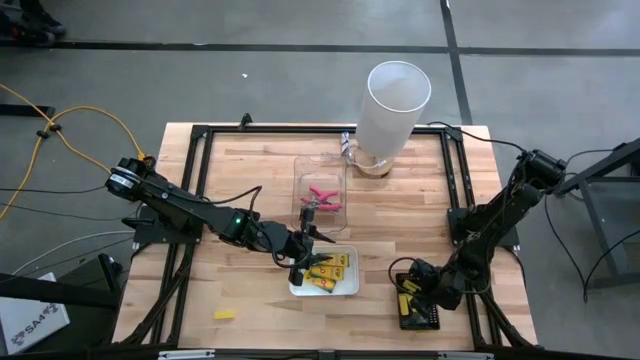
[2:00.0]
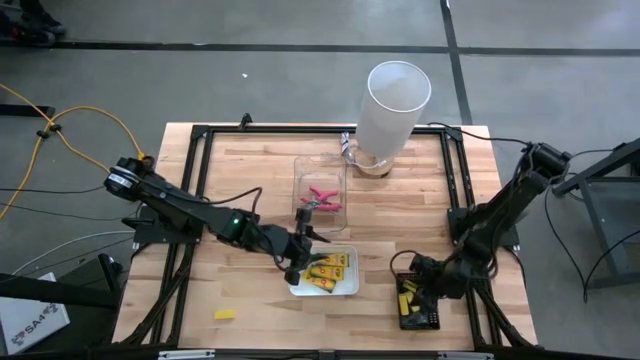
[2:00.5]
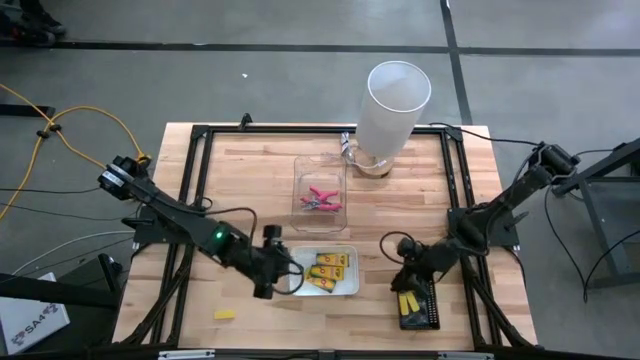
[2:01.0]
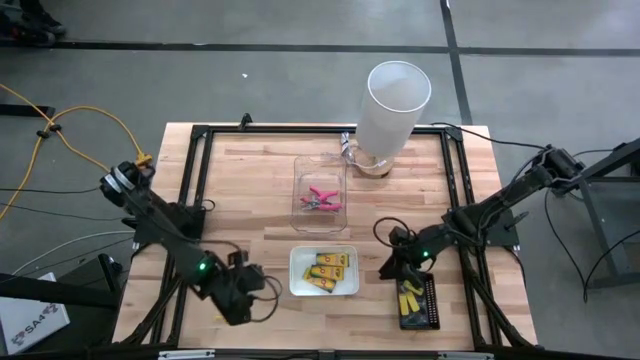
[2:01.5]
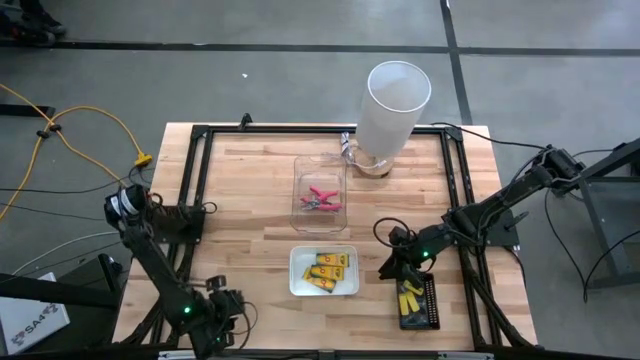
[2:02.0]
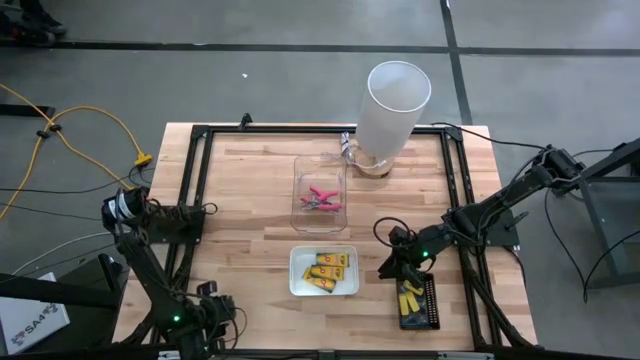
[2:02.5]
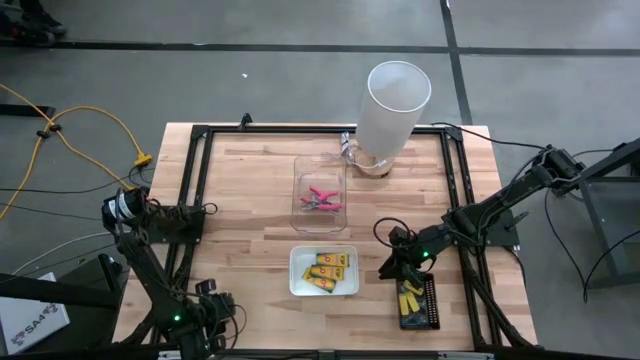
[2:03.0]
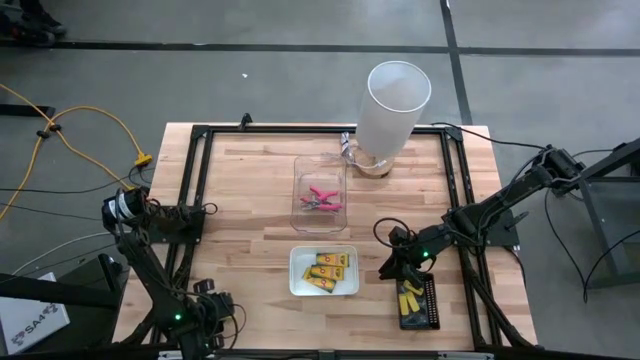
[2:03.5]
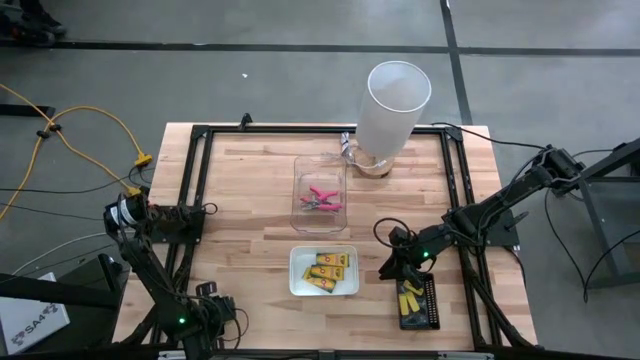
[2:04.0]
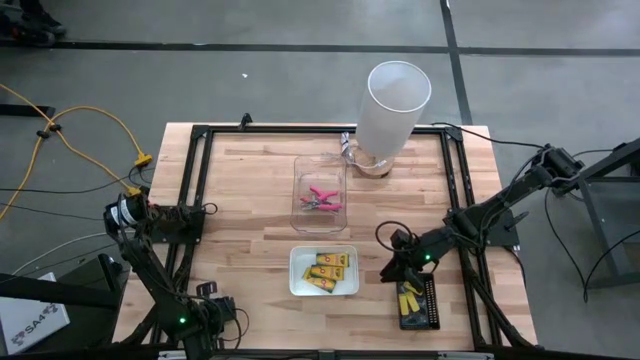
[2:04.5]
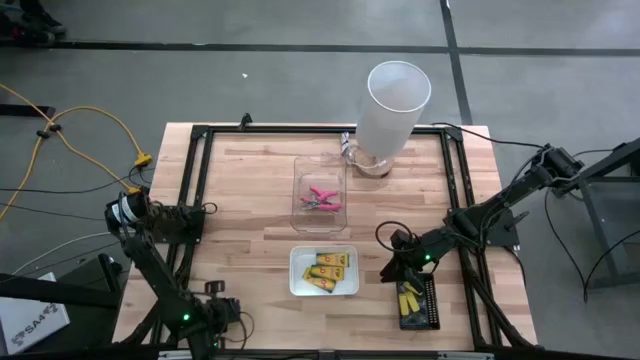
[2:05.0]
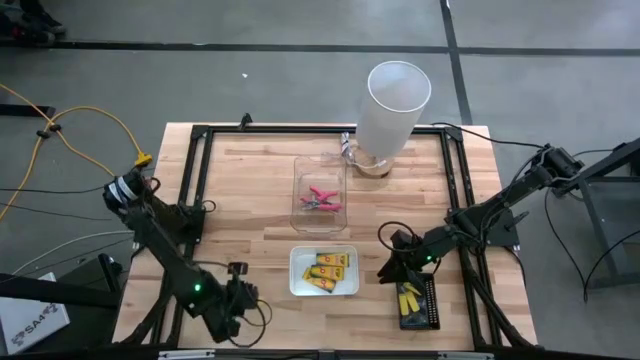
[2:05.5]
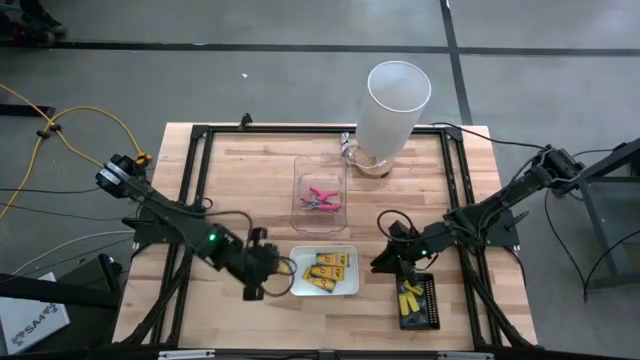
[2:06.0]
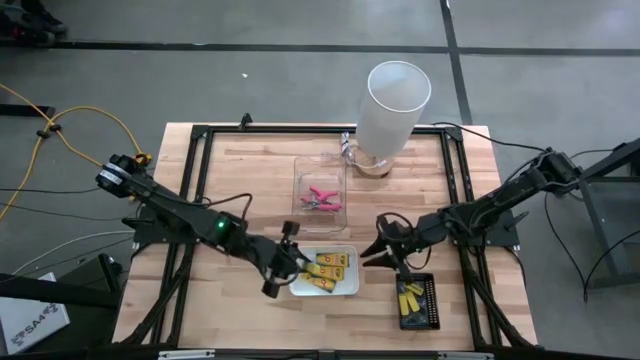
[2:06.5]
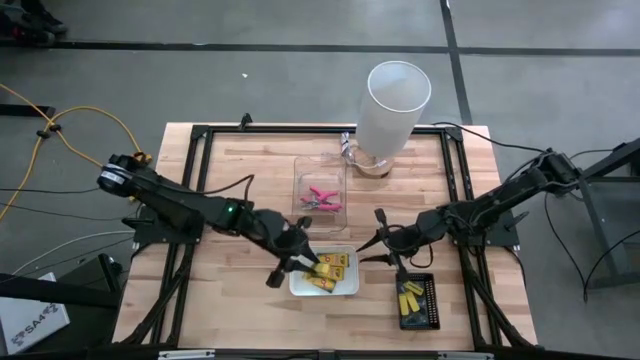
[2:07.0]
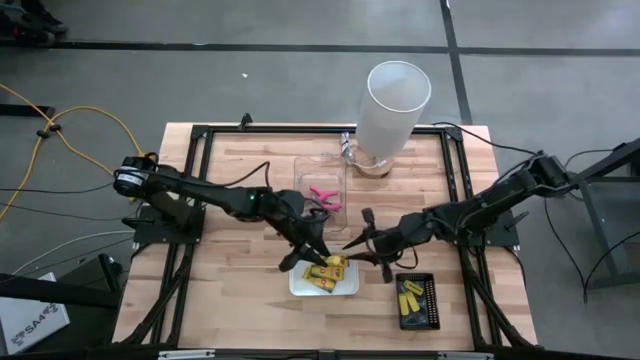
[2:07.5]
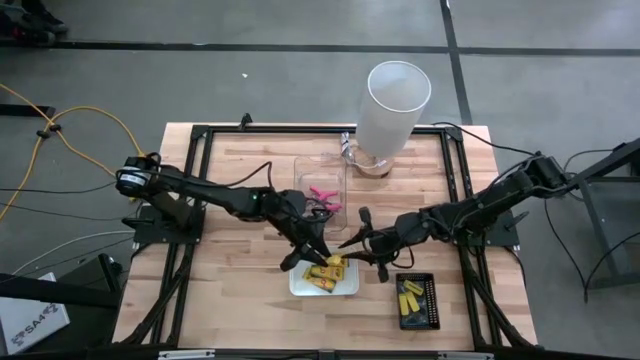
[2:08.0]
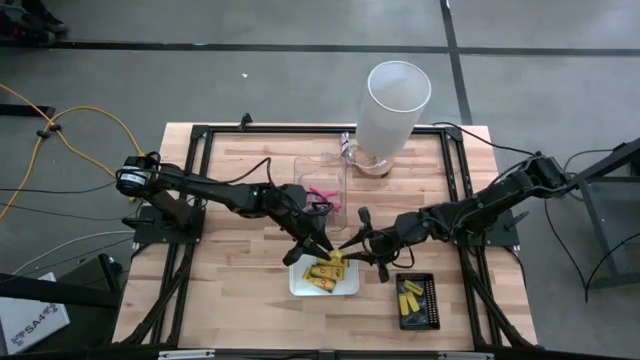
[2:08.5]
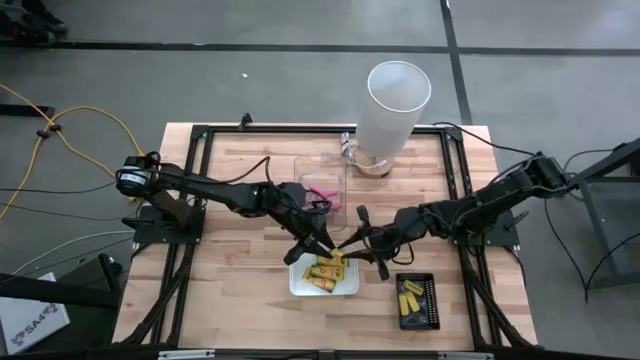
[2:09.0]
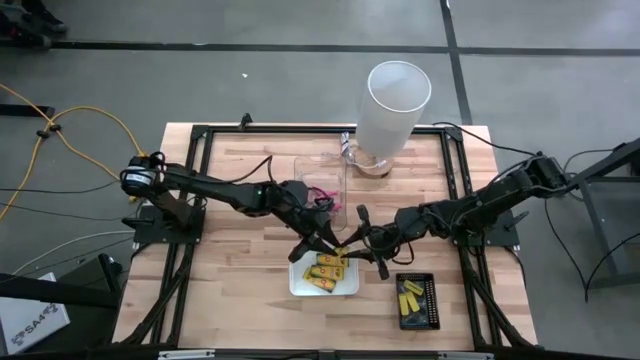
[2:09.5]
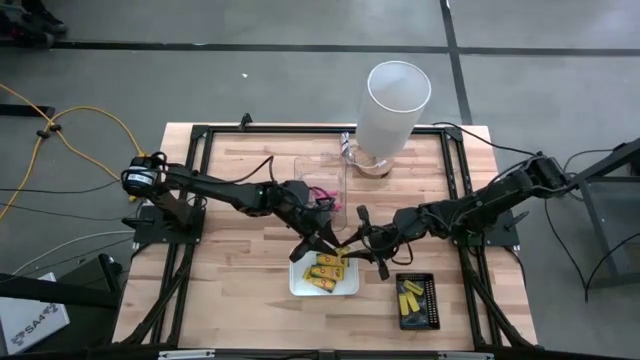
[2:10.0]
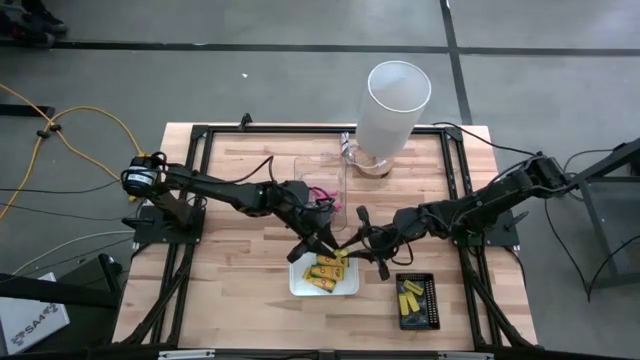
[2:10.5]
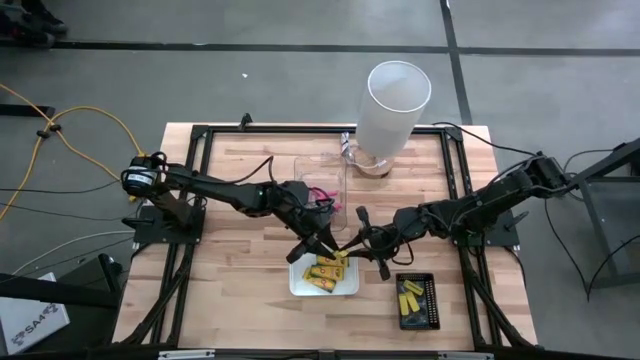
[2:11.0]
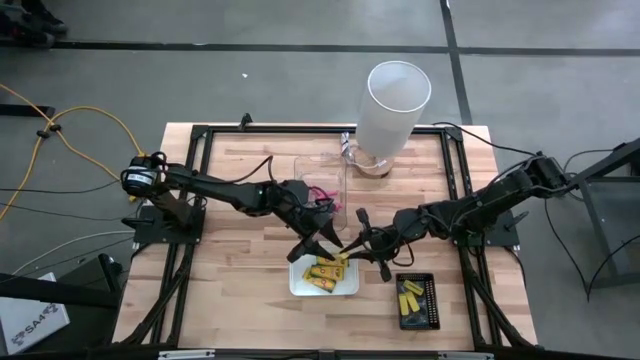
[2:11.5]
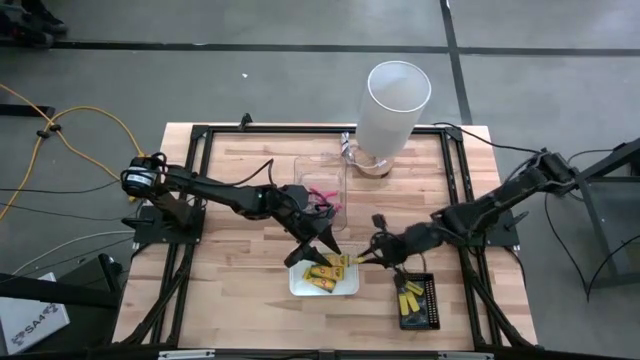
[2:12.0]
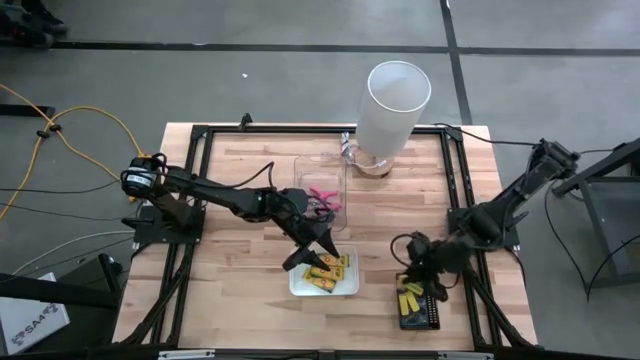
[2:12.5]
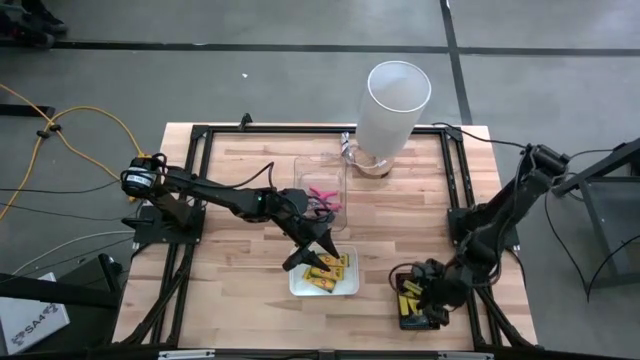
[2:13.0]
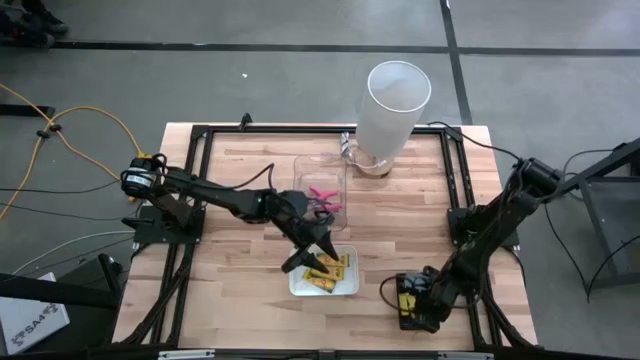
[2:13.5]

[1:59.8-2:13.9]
Task: Pick & Place School Supplies
Put the yellow eraser into the black bin

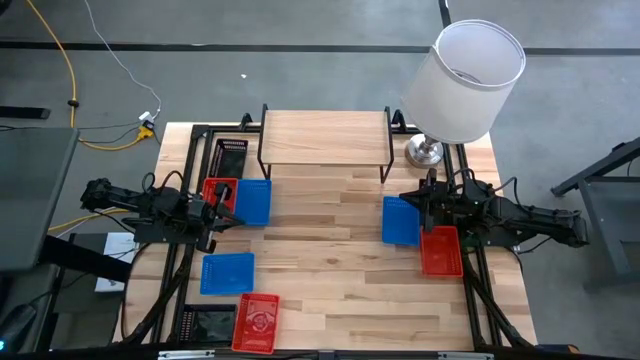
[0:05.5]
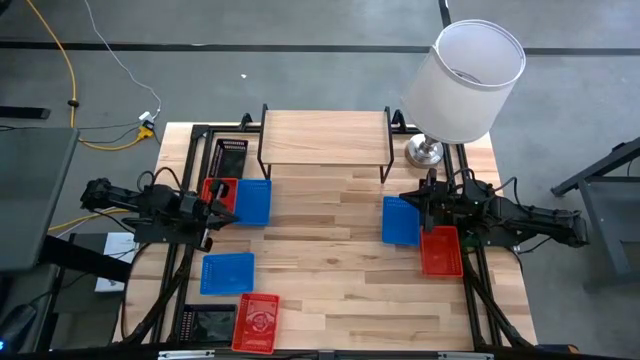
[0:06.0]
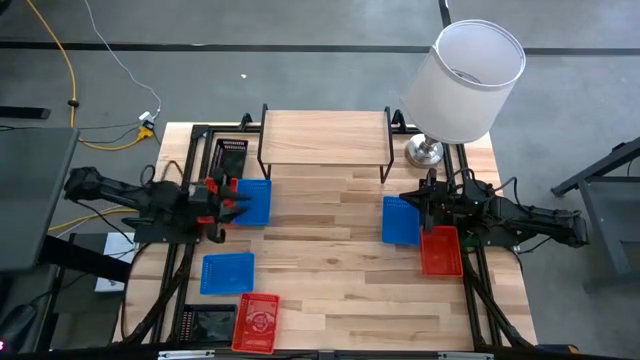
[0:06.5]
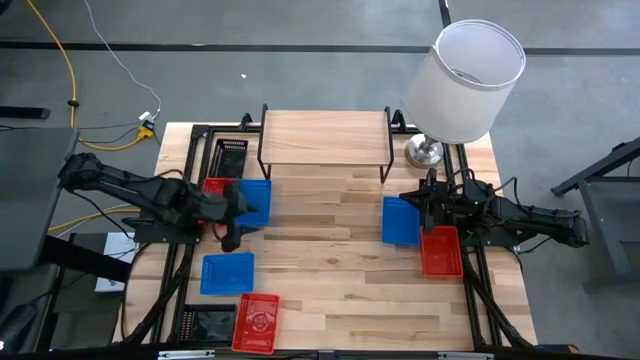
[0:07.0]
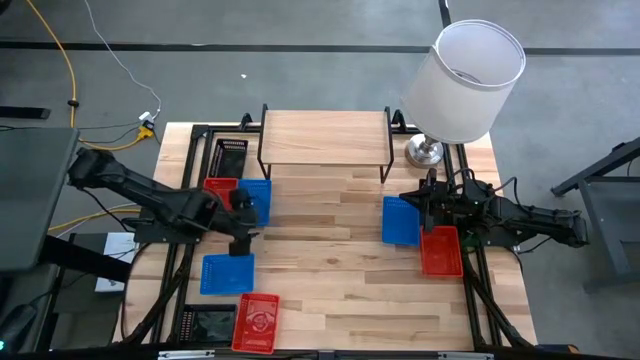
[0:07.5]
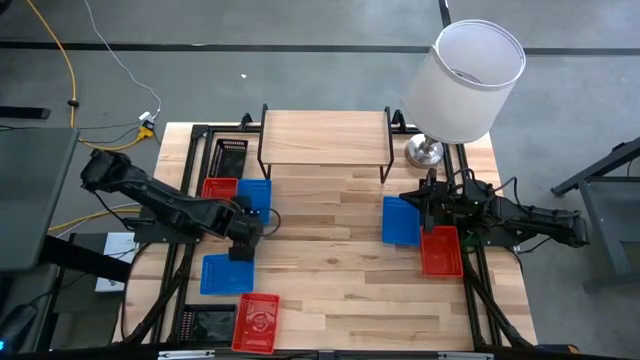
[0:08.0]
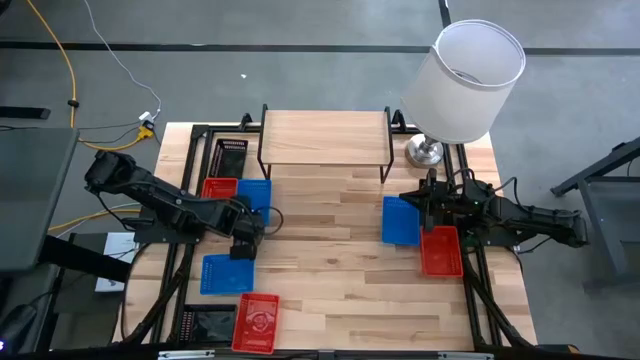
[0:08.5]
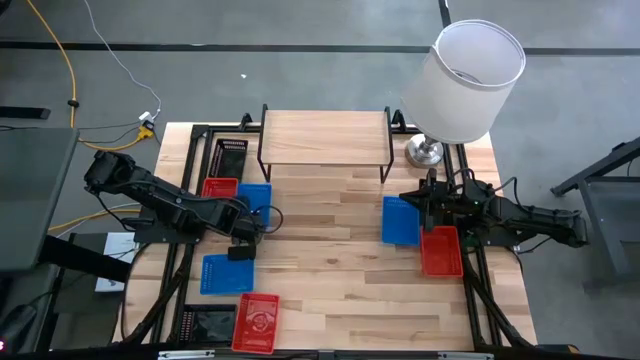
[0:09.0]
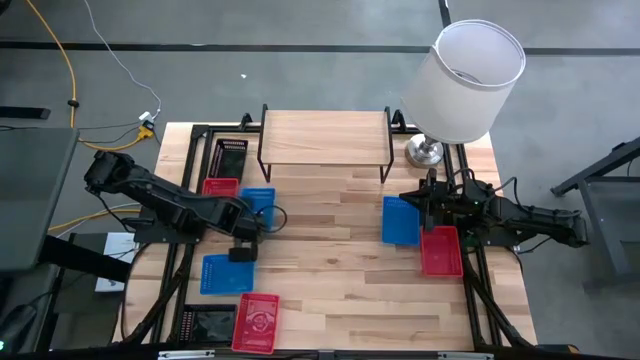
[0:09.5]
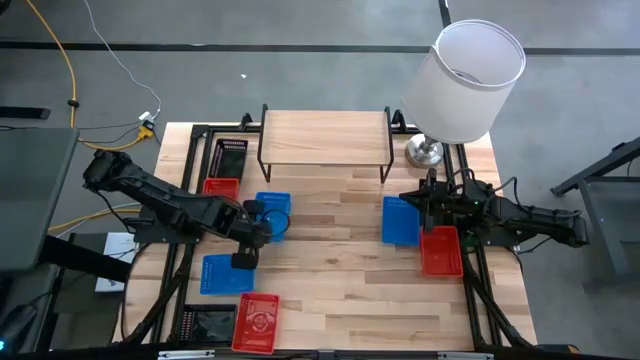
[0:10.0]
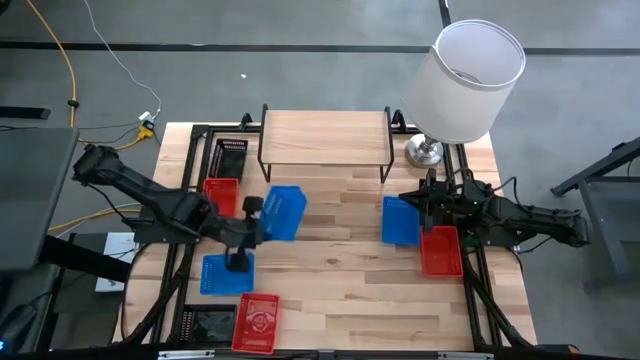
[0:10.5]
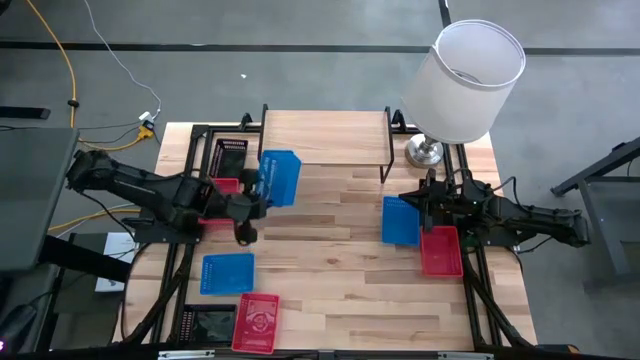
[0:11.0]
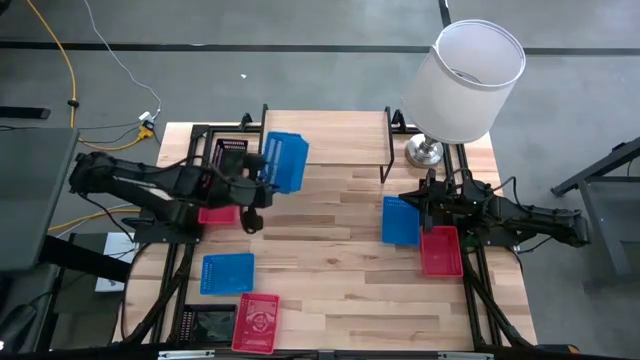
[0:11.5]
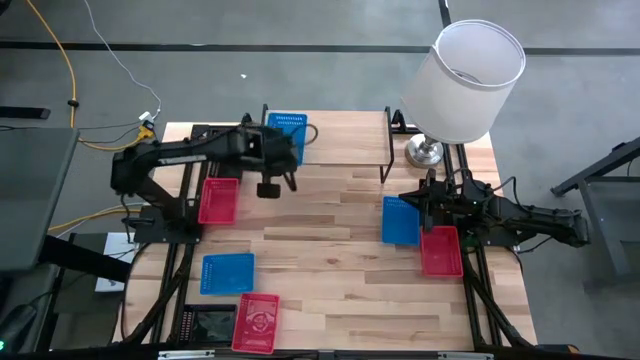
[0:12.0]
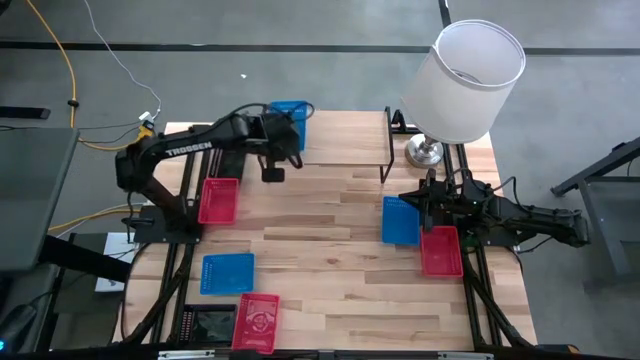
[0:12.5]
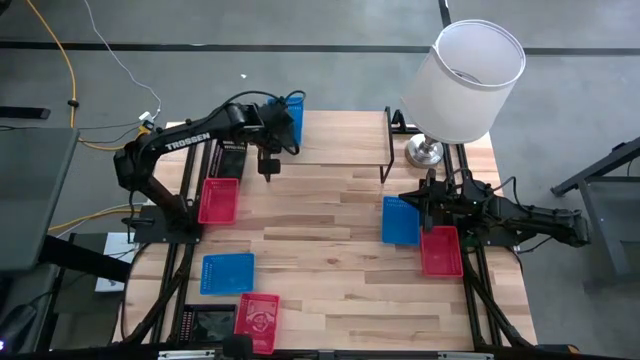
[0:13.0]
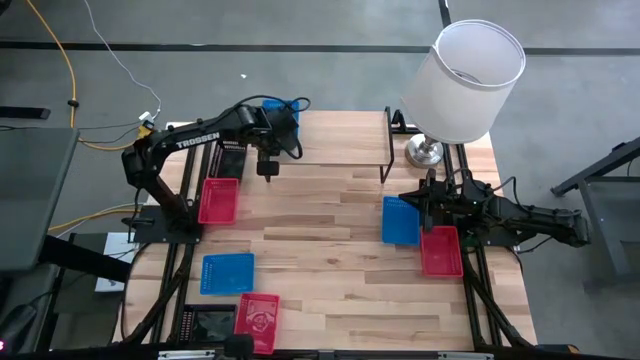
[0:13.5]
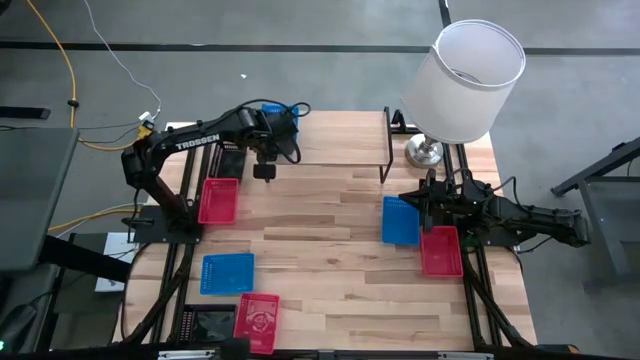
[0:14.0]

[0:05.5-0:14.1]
Task: Stack baskets on shelf by color
Put the top left blue bin on the shelf
